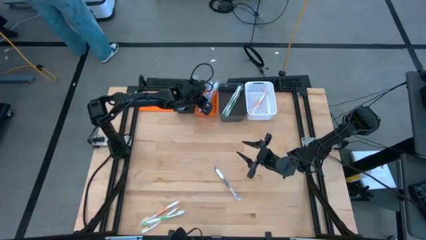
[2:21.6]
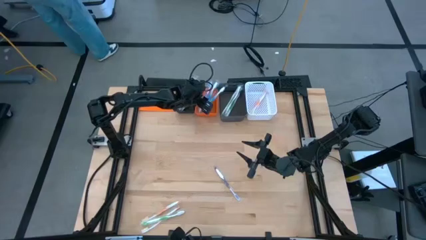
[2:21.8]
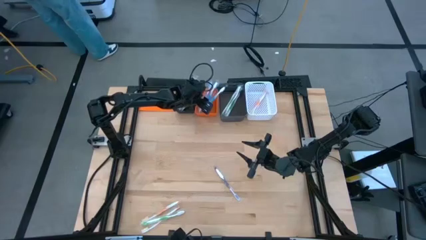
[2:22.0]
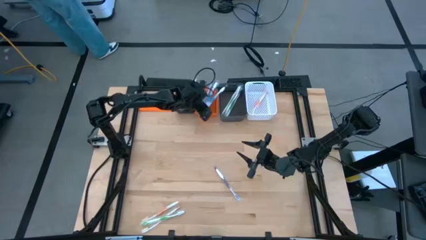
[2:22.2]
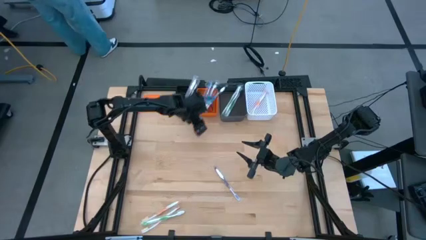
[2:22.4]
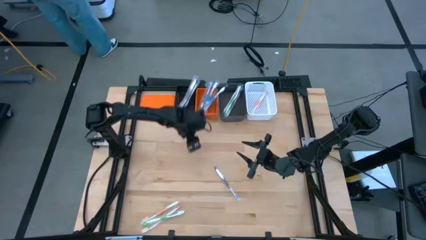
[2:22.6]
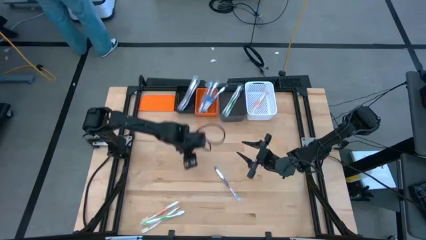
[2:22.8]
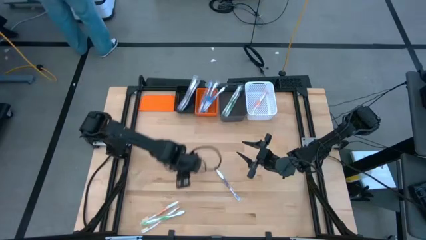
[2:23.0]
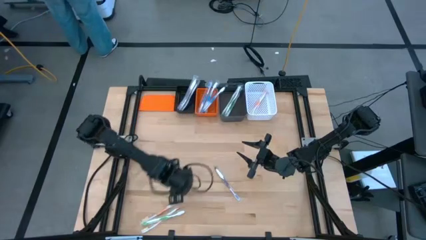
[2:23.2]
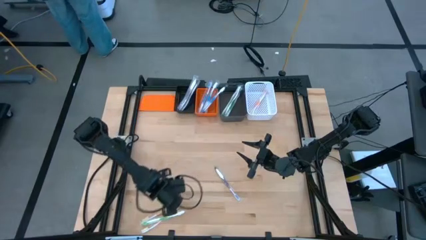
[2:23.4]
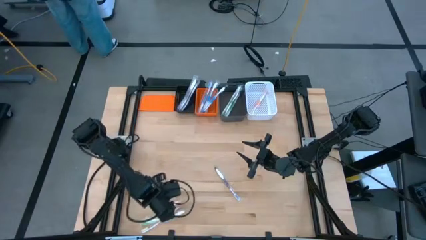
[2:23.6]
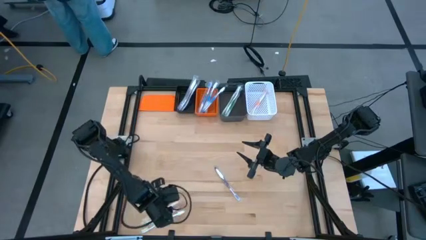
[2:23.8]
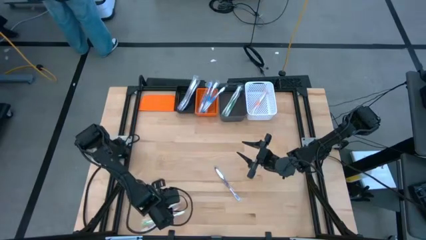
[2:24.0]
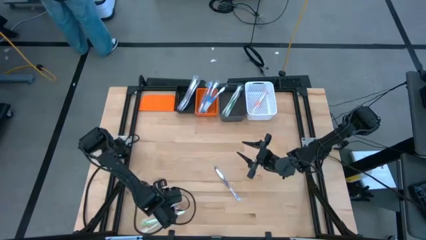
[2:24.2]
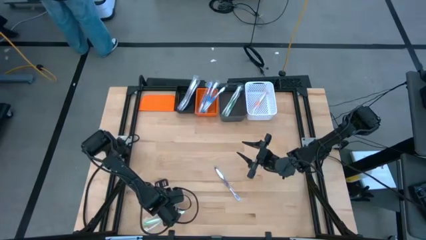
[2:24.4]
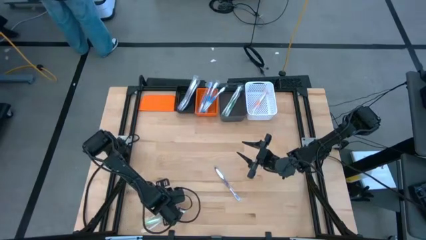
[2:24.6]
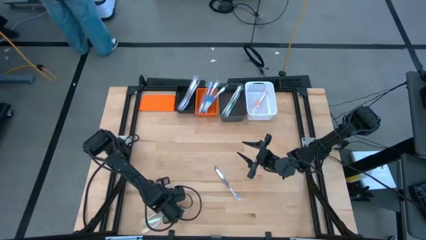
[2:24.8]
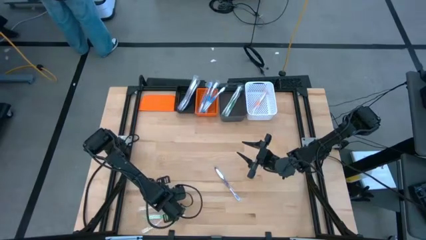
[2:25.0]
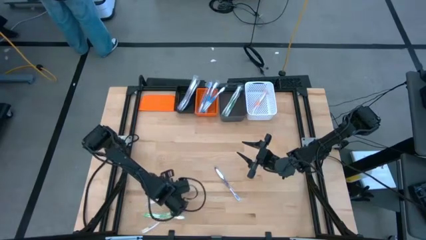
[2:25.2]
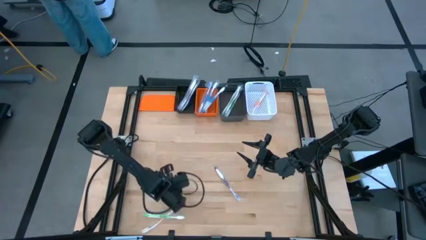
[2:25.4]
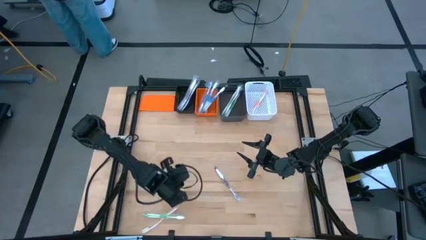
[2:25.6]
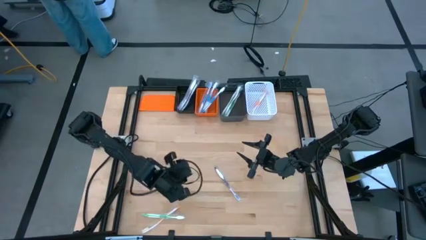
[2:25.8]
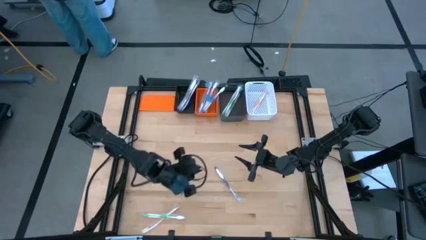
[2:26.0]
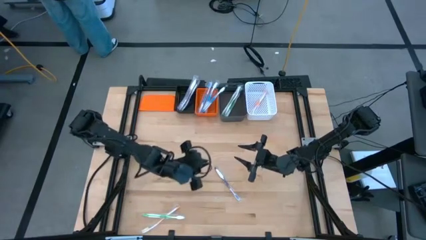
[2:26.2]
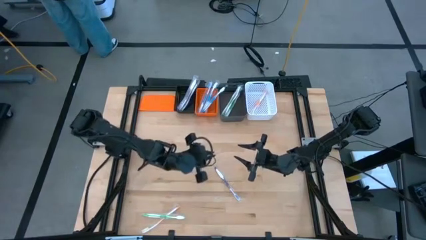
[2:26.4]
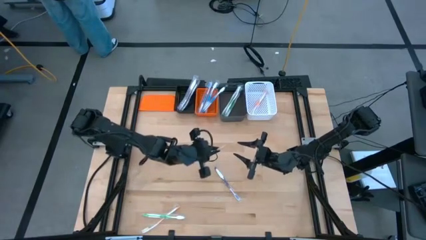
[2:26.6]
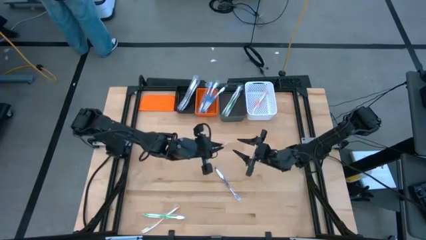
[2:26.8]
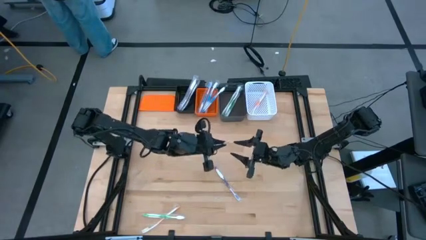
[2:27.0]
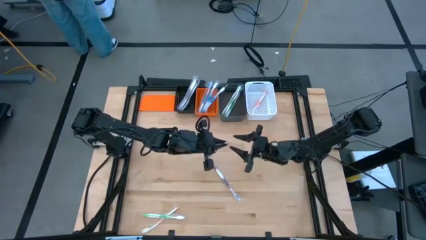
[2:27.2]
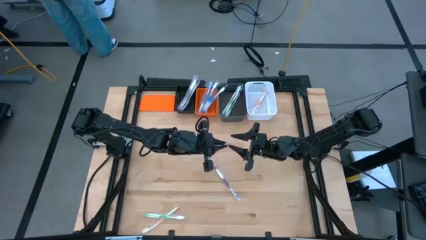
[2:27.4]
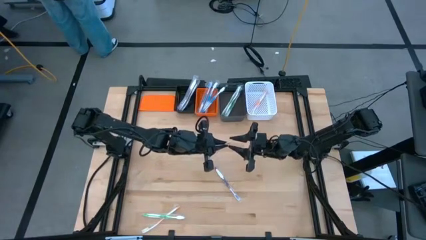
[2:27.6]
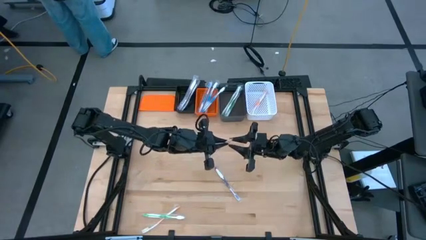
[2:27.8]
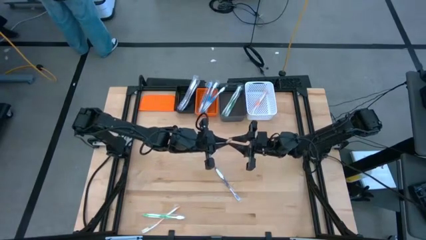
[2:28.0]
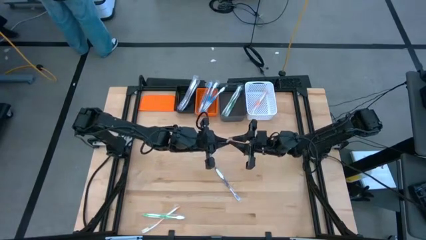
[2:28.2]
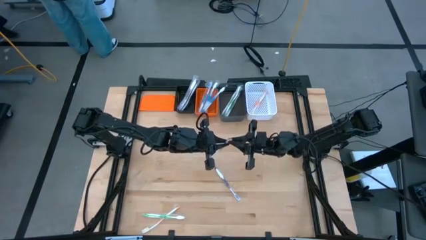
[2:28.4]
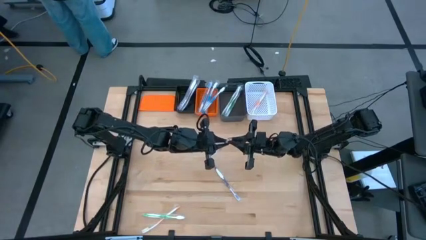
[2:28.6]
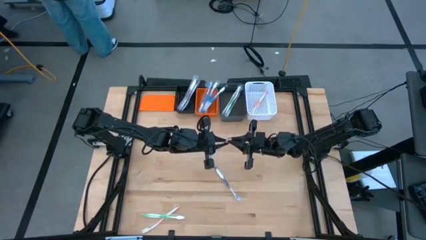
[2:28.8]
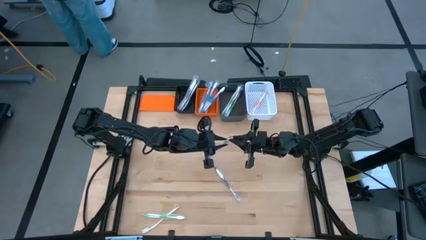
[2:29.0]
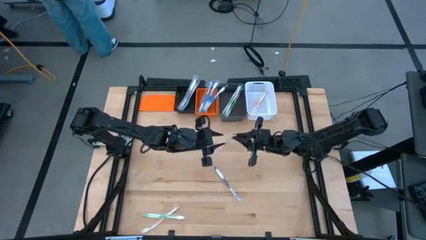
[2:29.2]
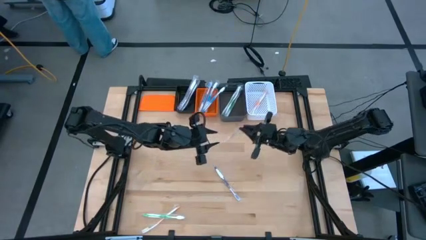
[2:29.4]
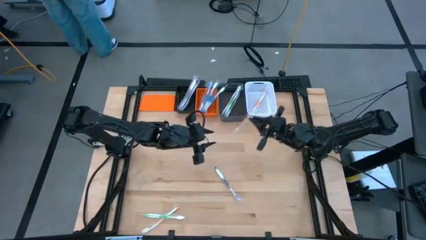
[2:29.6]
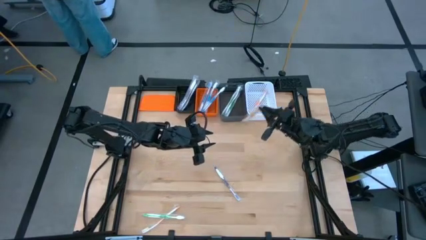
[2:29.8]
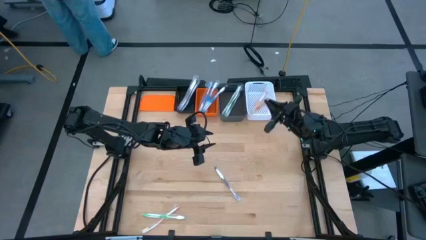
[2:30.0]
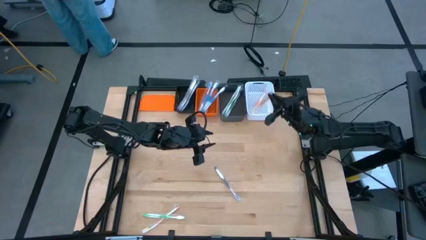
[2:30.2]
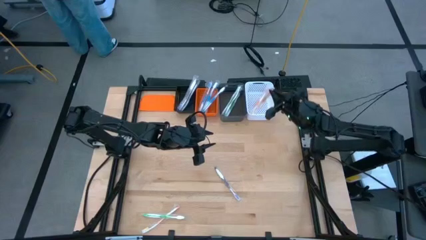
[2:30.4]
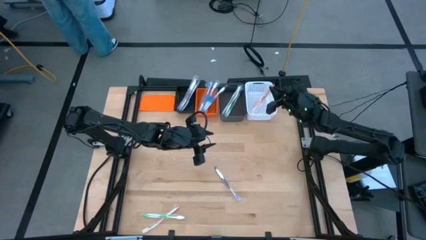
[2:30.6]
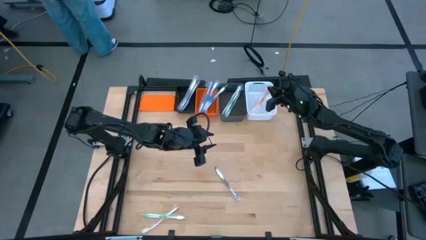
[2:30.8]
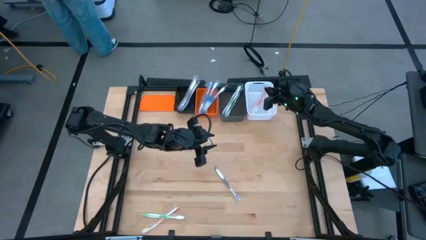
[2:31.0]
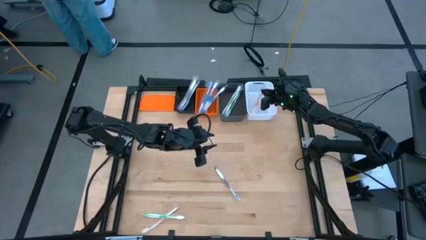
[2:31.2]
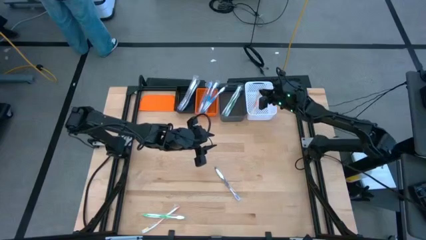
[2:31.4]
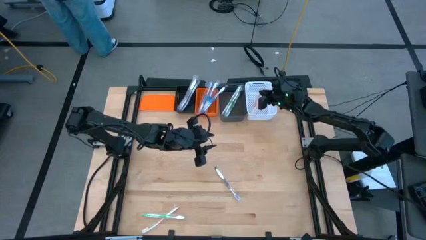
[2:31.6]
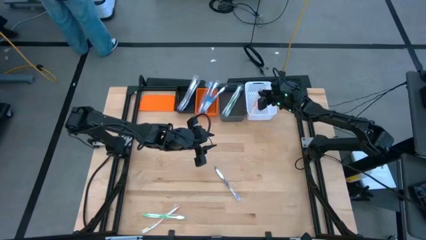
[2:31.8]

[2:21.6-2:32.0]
Task: Pick & Place Toothbrushes
Put the orange toothbrush into the white bin

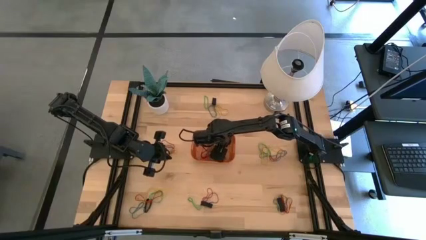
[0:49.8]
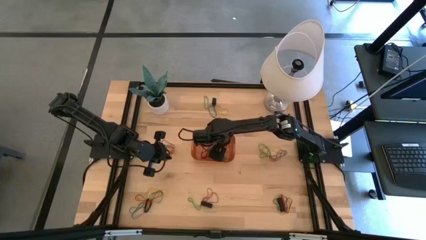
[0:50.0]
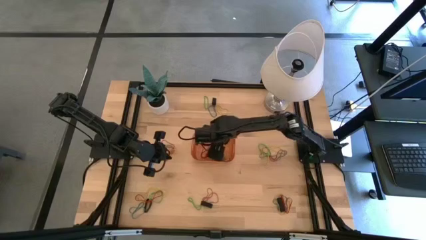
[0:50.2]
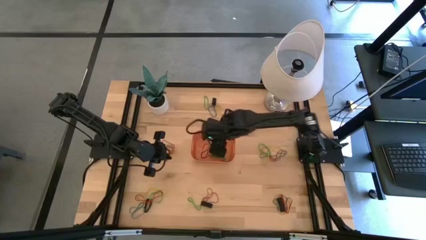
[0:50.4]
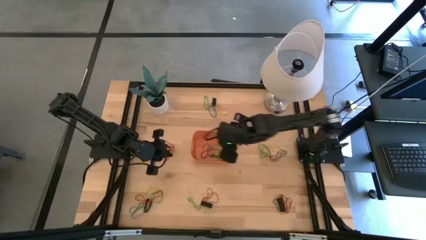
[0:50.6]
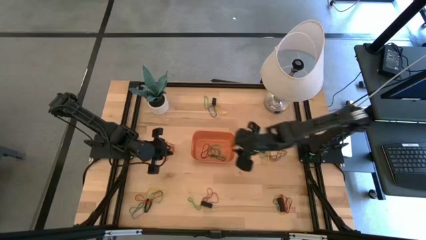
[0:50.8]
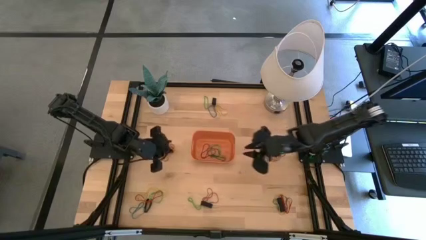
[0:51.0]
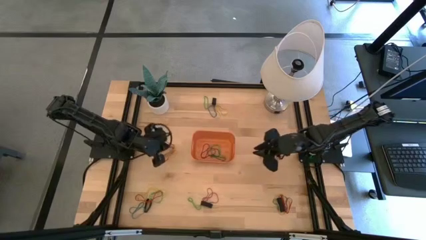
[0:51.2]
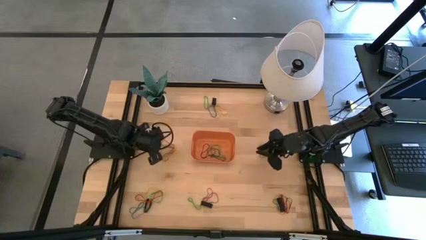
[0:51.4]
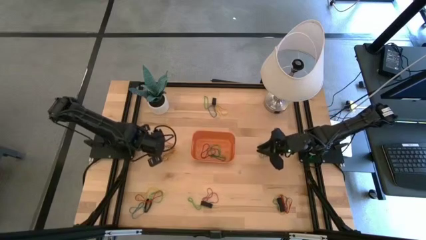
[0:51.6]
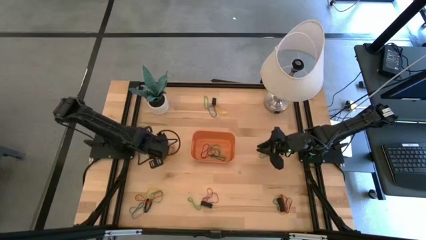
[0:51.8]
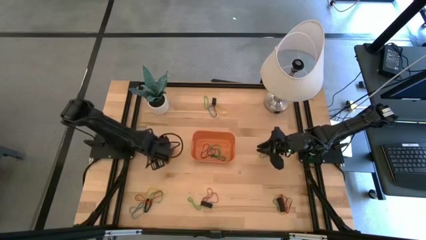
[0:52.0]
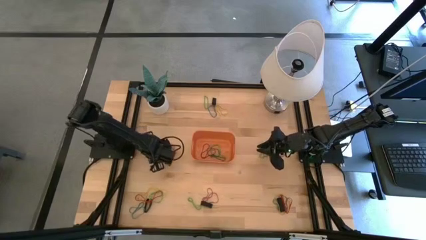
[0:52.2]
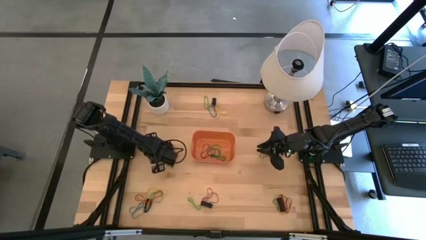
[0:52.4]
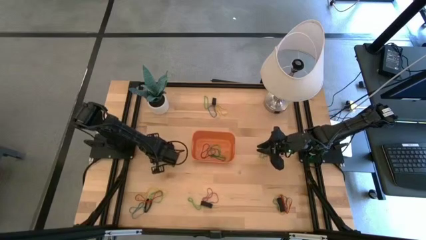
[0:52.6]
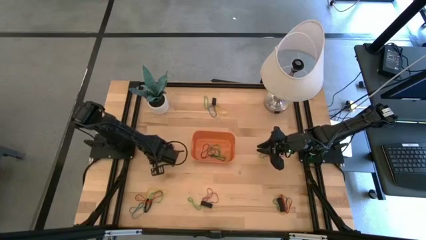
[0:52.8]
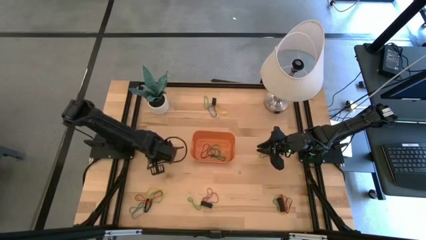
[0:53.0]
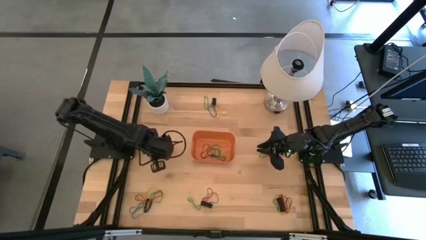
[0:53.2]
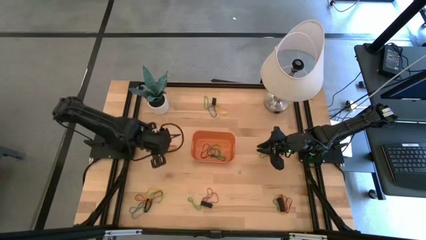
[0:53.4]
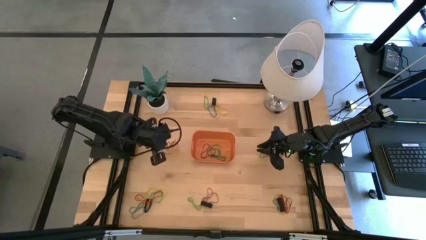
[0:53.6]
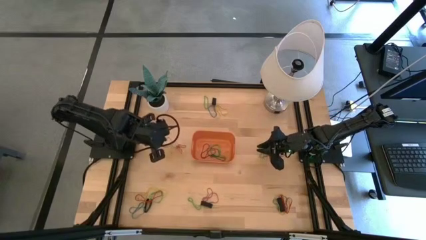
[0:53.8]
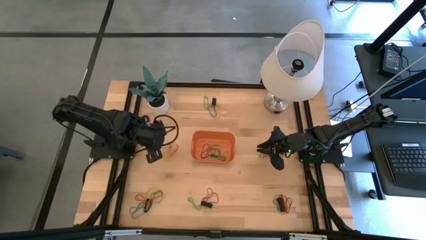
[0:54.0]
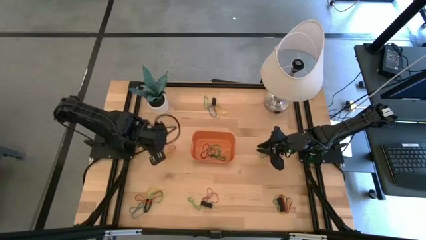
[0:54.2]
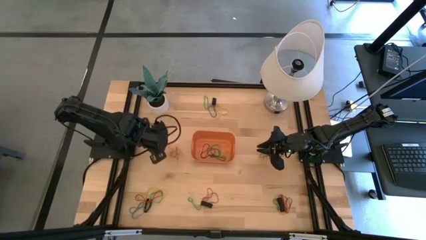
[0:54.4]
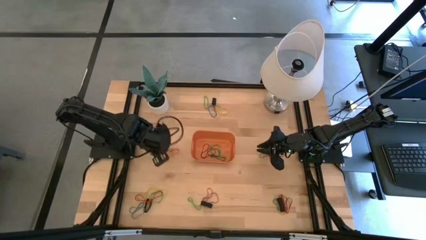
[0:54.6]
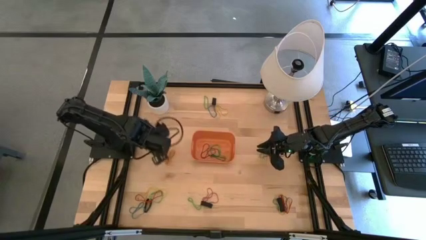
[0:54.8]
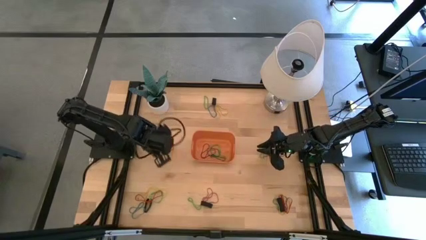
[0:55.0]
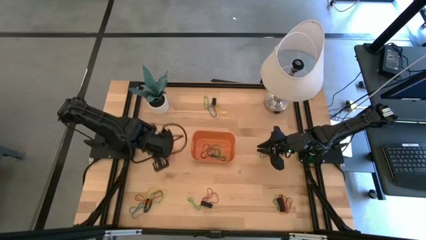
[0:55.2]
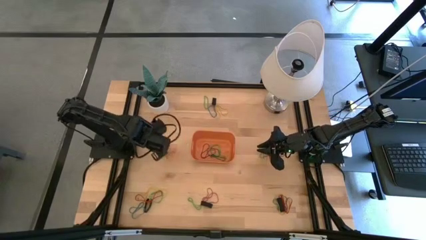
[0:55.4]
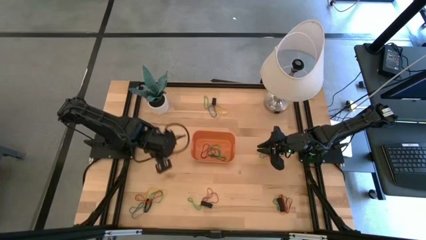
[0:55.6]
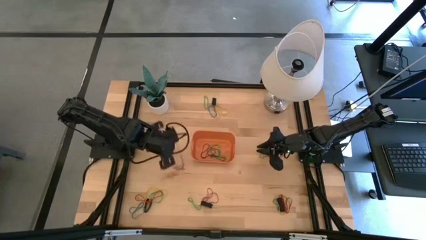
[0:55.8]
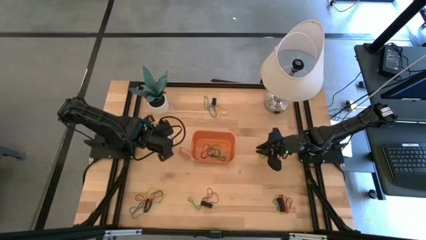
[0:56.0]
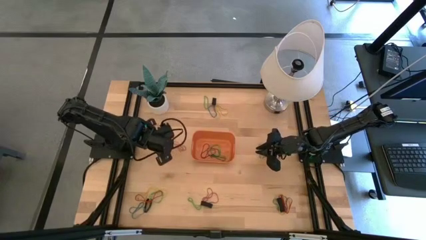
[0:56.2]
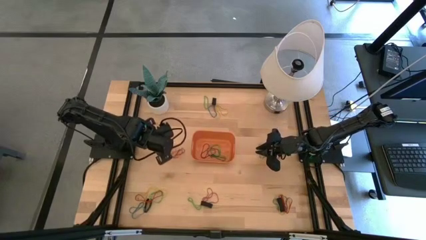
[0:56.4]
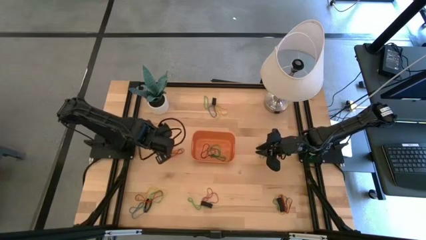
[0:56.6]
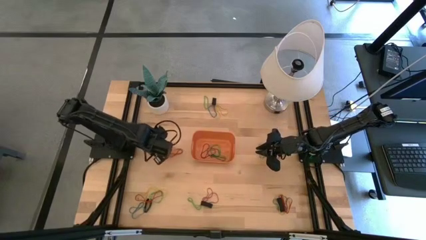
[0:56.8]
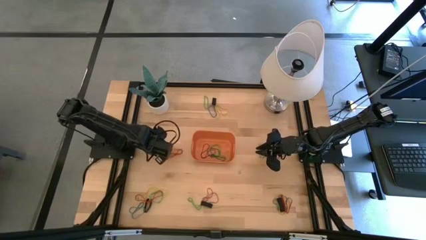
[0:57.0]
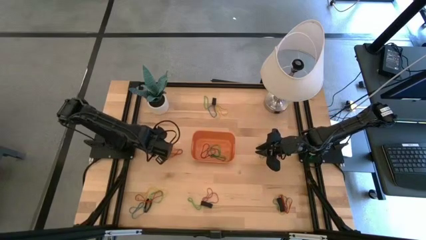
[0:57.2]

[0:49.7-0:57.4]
Task: Pick and place rubber bands into bin
Put the red rubber band into the orange bin
